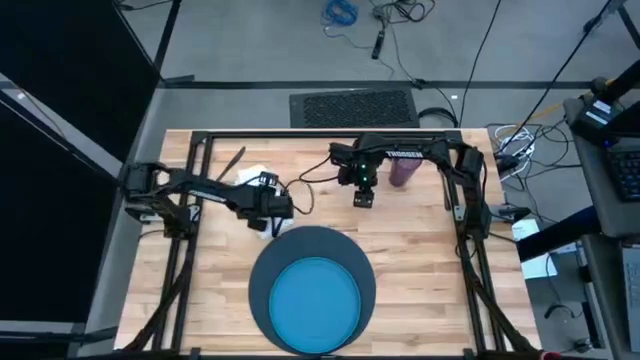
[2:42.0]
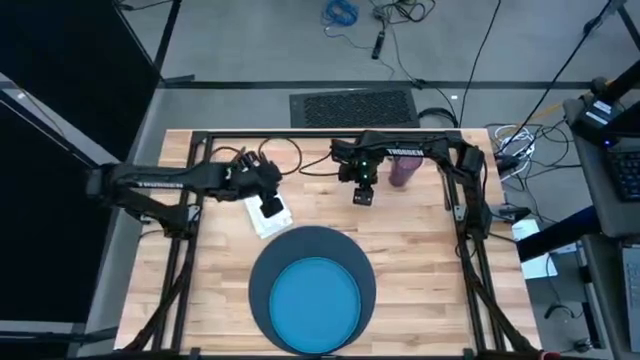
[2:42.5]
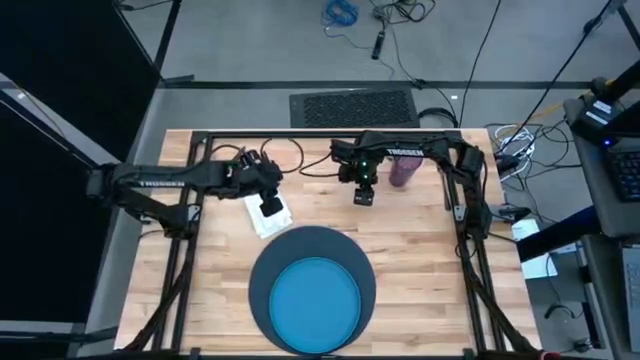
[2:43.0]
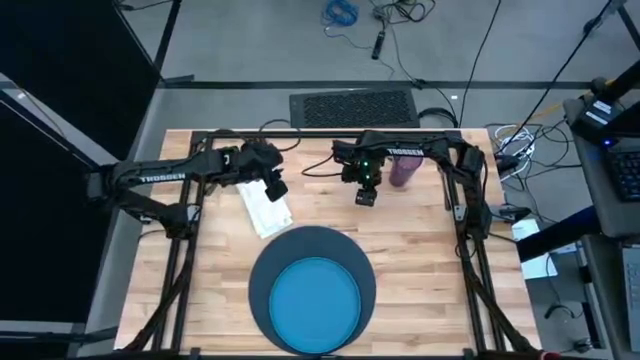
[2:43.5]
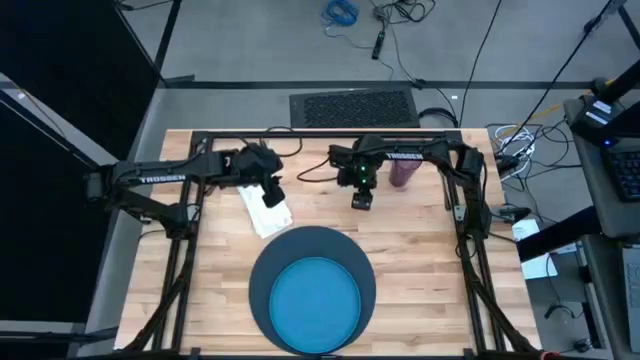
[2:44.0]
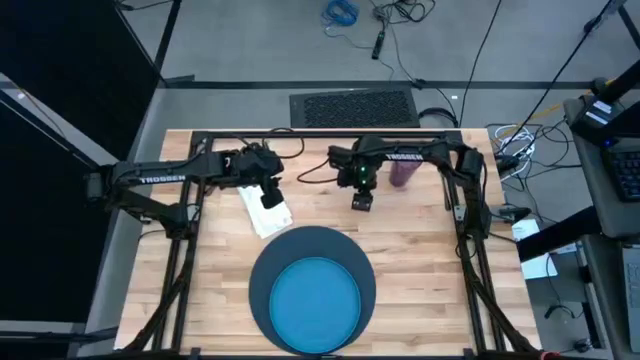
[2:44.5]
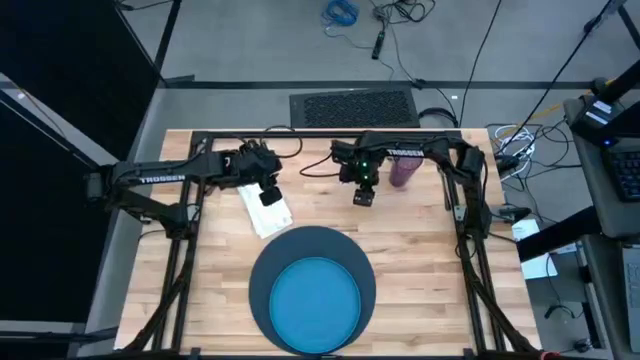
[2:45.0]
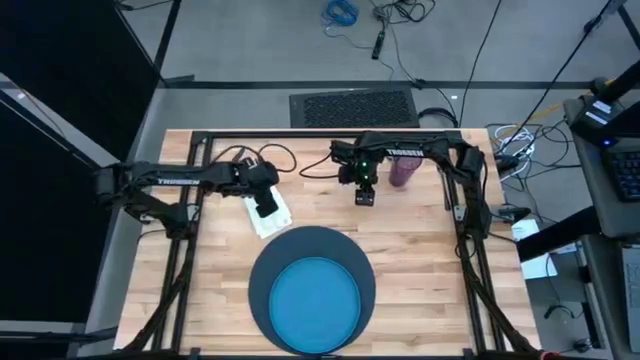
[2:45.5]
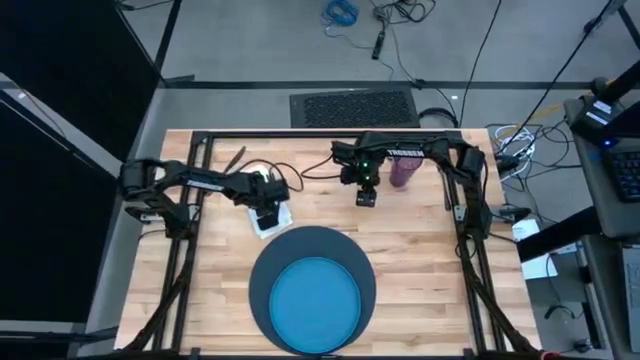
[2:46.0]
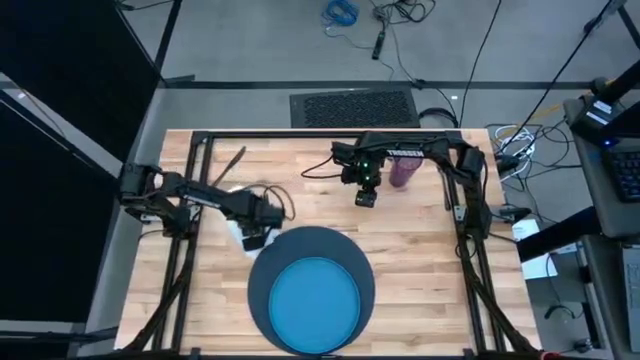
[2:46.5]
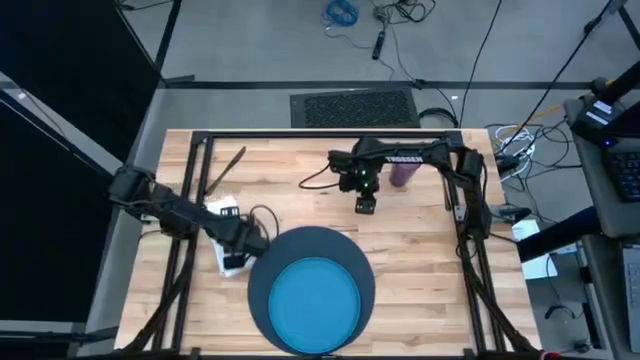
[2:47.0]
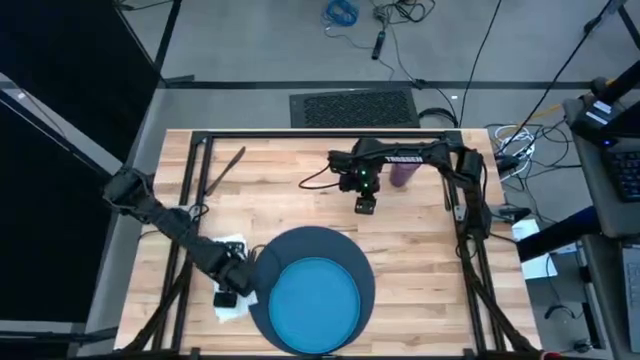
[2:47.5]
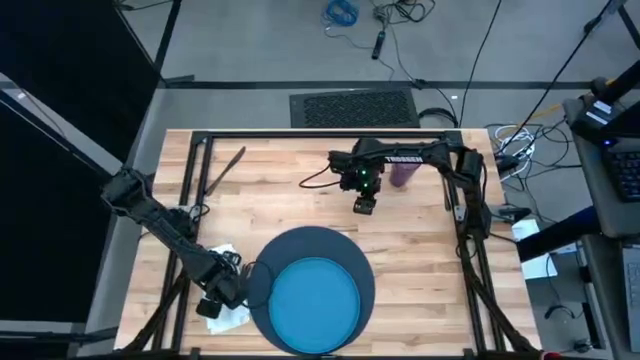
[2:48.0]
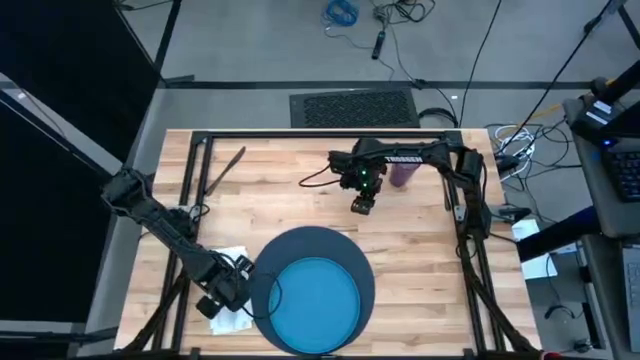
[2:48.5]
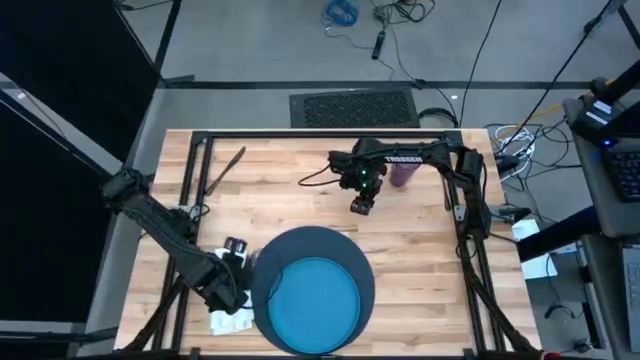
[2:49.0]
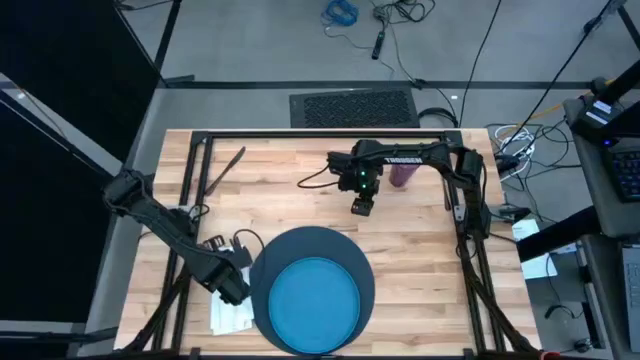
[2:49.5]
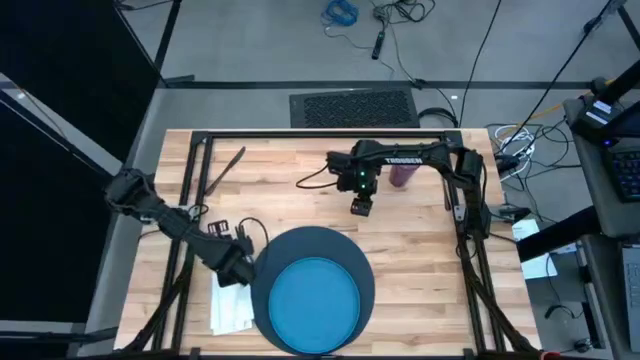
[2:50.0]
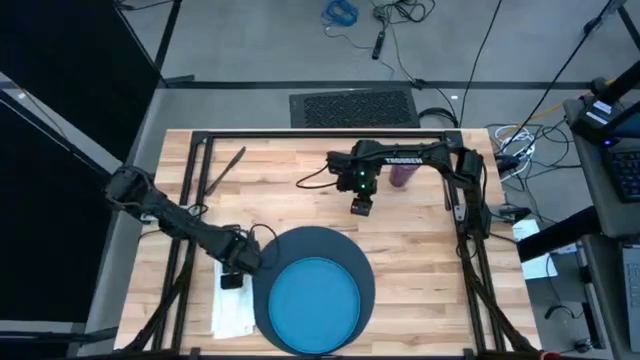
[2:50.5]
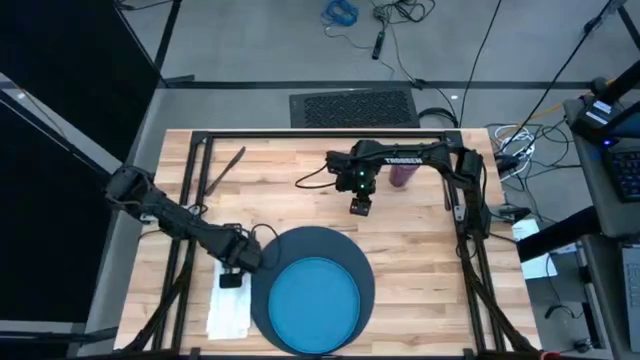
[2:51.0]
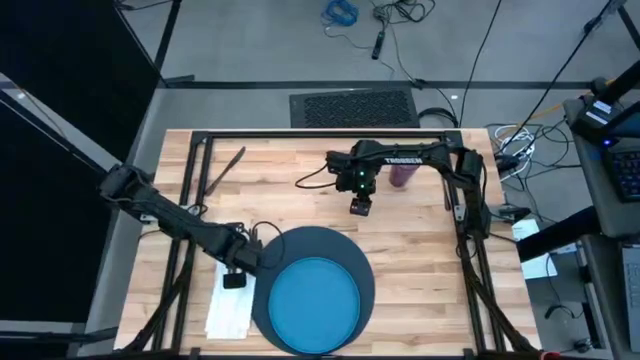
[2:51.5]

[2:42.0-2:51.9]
Task: Set table place
Put the white napkin to the left side of the blue table mat

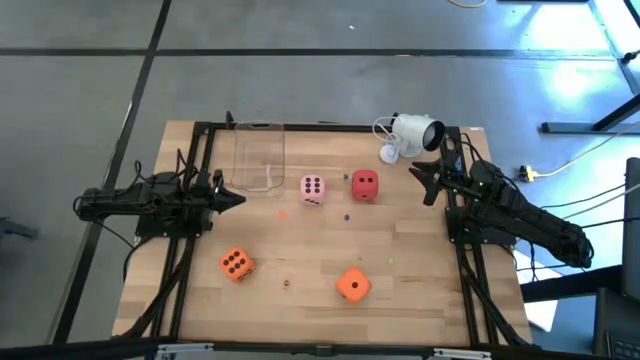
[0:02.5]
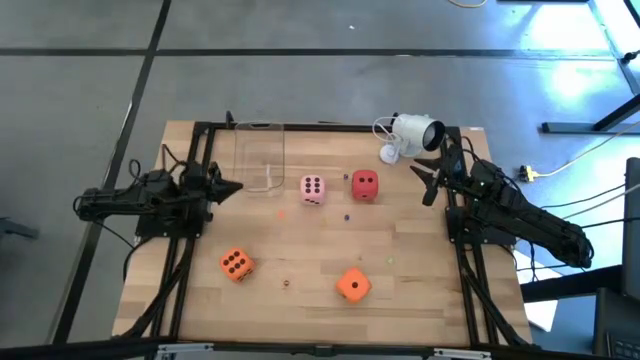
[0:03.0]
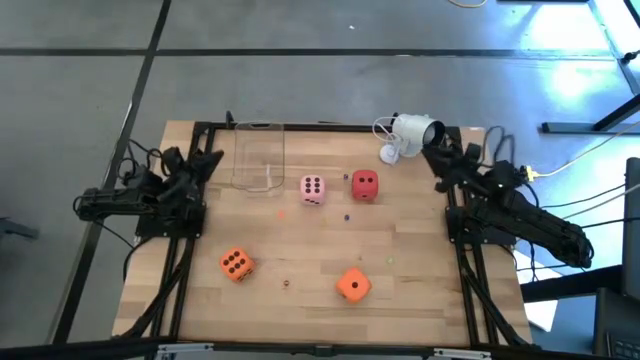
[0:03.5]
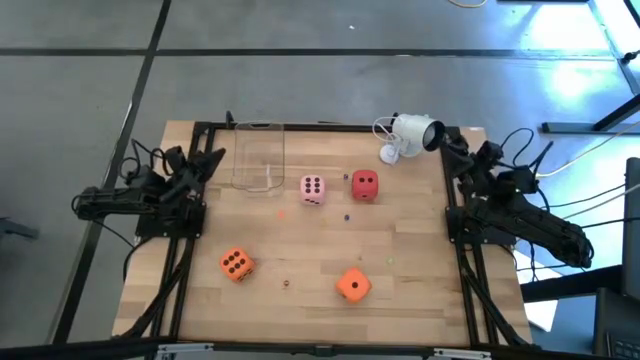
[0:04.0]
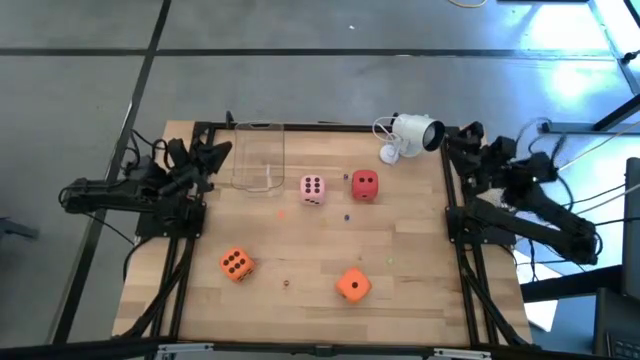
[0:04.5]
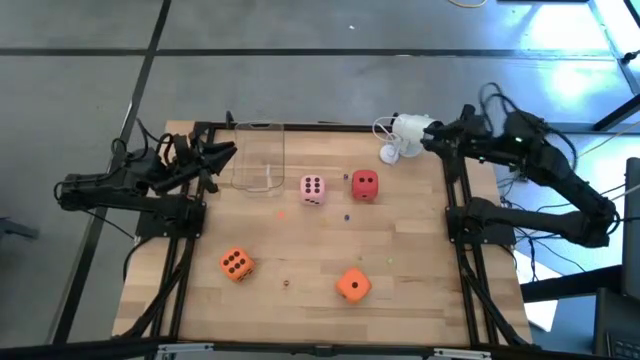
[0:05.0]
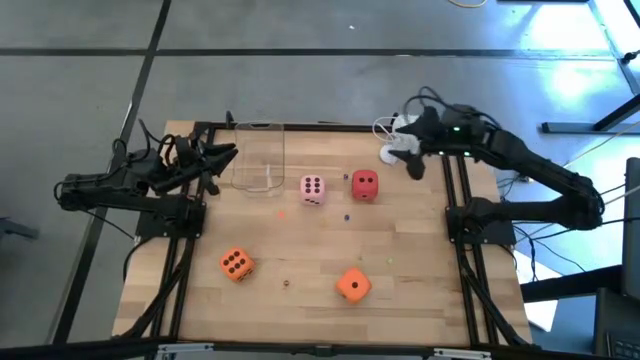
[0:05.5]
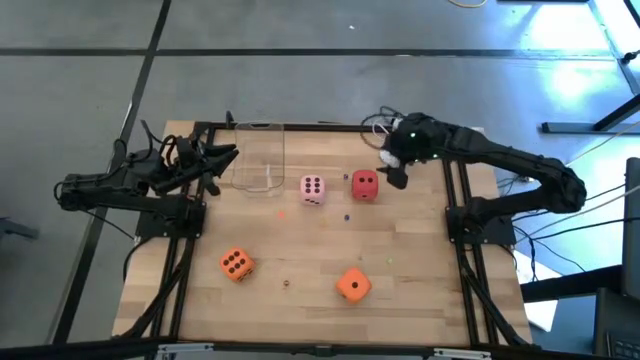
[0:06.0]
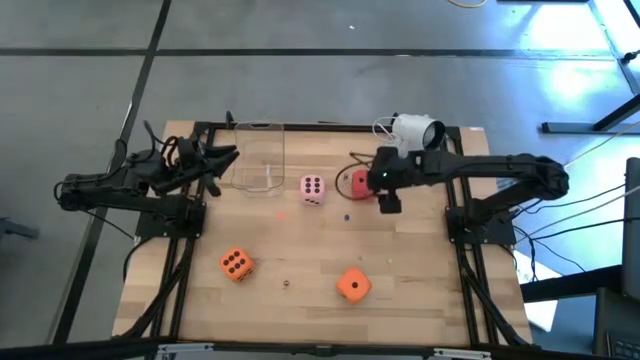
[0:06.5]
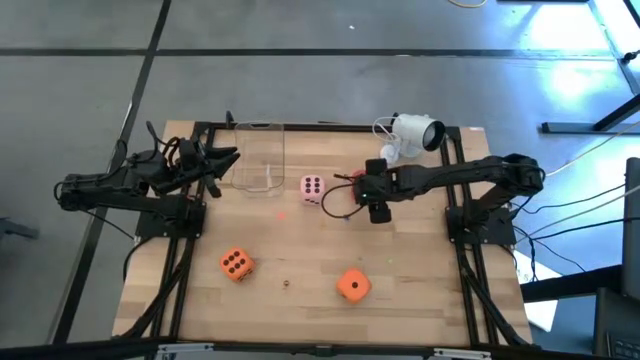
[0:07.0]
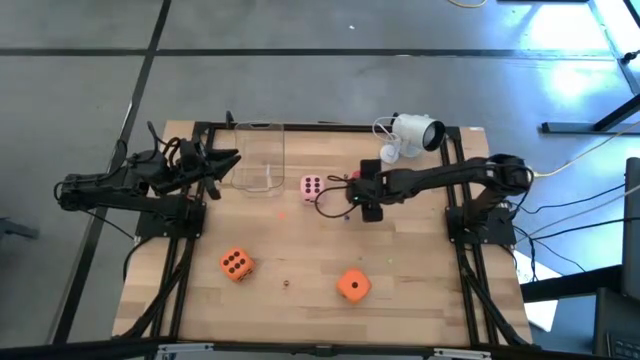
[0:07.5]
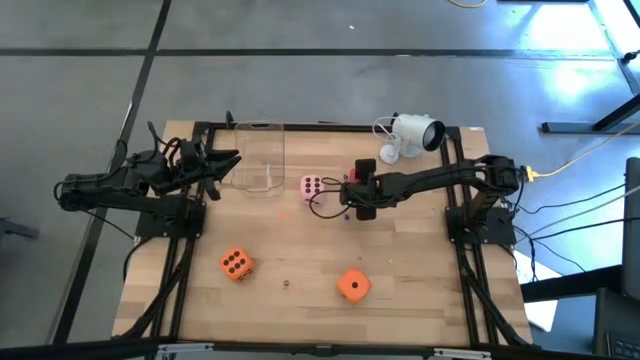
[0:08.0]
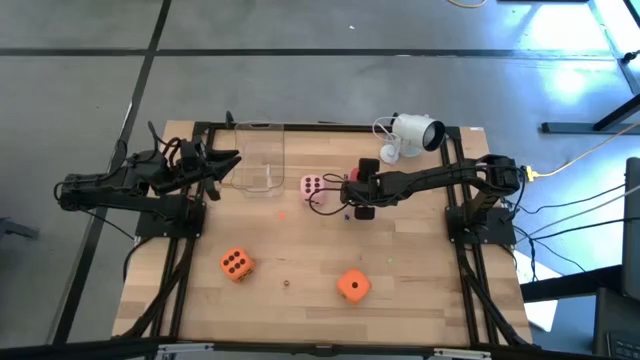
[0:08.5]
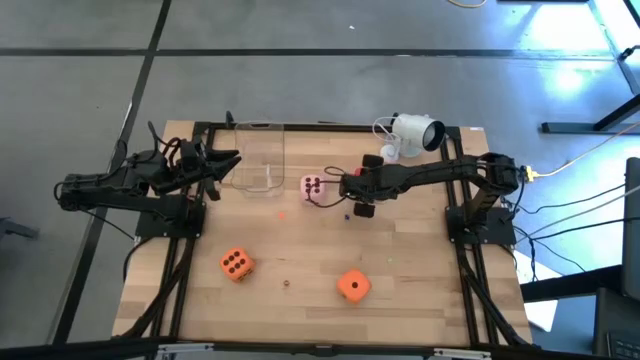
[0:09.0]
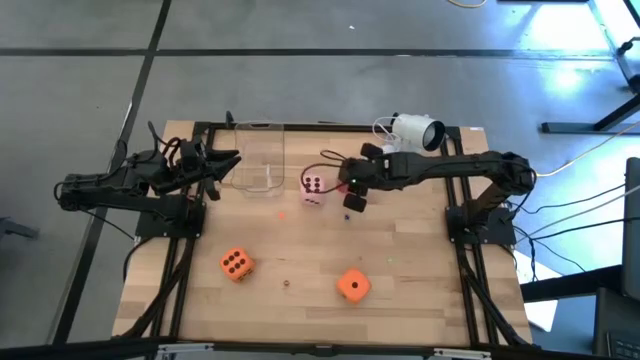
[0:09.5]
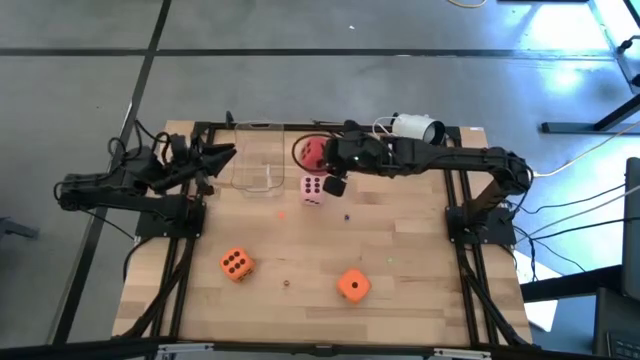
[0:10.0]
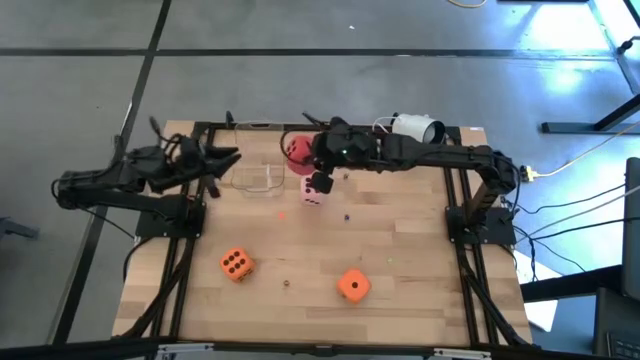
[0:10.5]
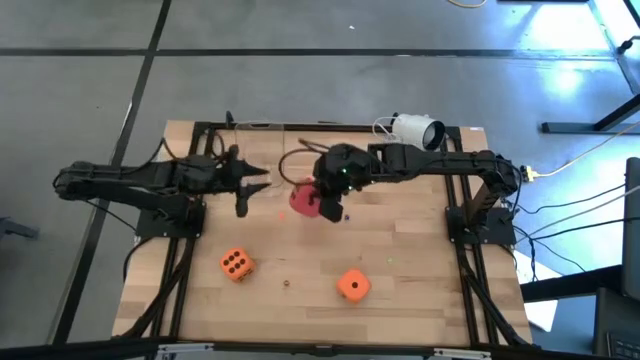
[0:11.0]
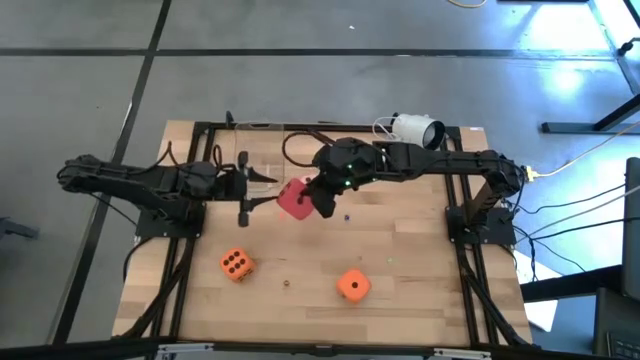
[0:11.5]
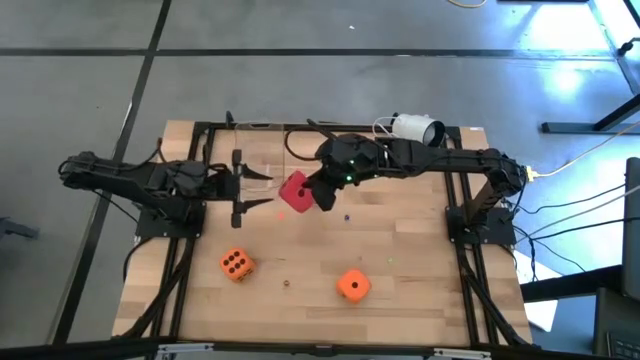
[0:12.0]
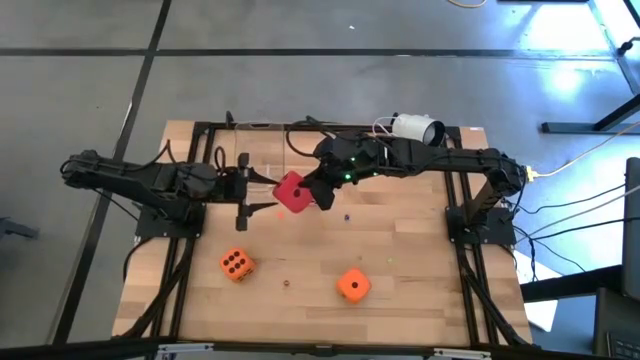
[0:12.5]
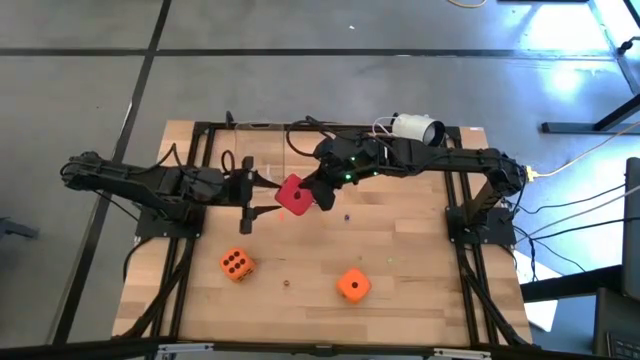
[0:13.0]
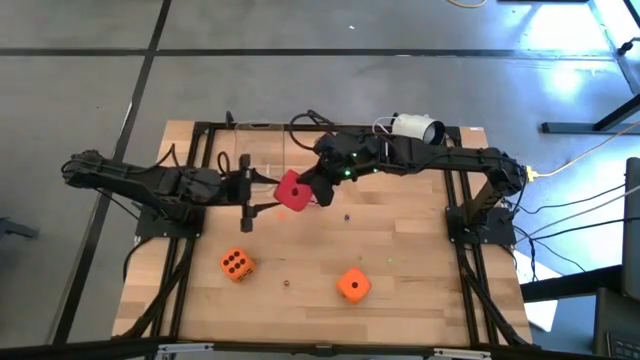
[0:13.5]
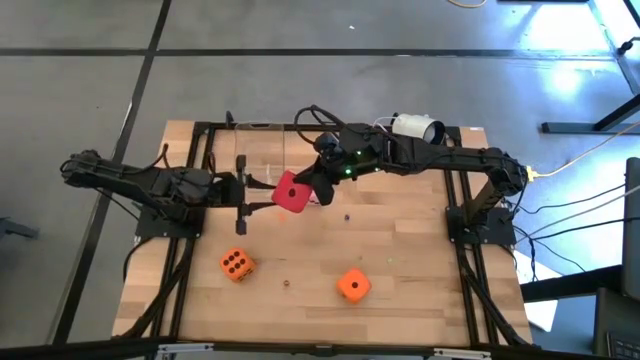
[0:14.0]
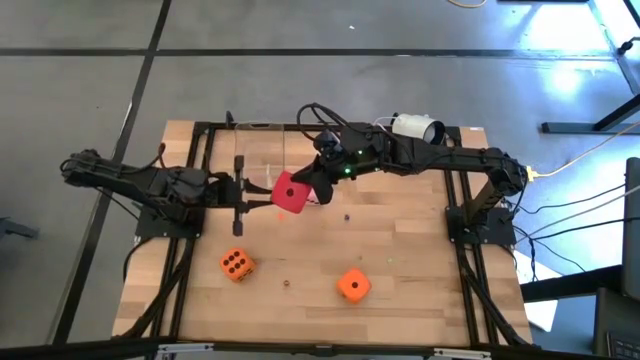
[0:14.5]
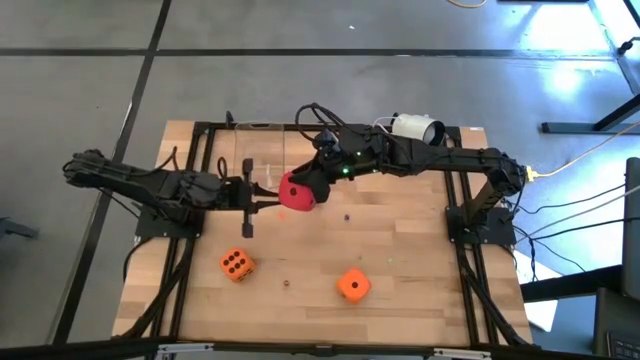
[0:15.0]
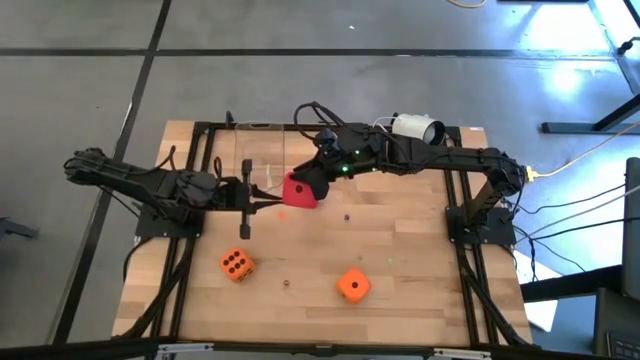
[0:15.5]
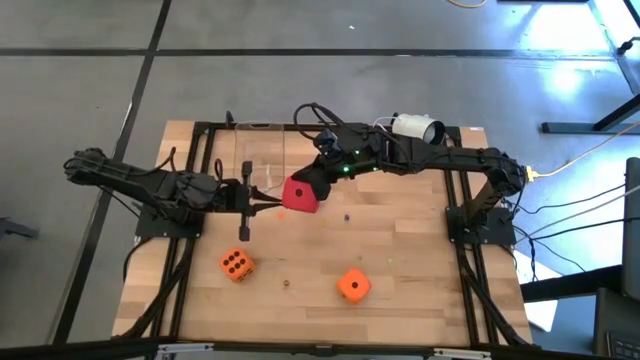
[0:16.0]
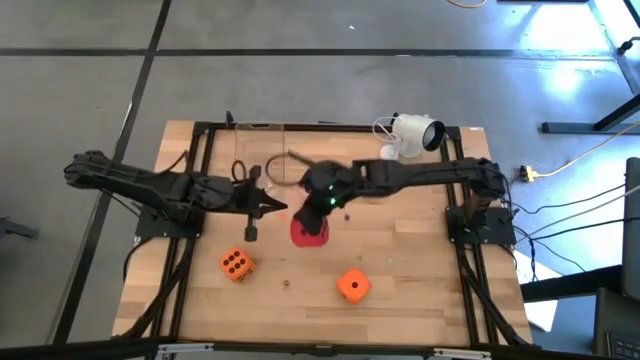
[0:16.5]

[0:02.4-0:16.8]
Task: Pick & Place Dice
Put the large red dice into the transparent bin
